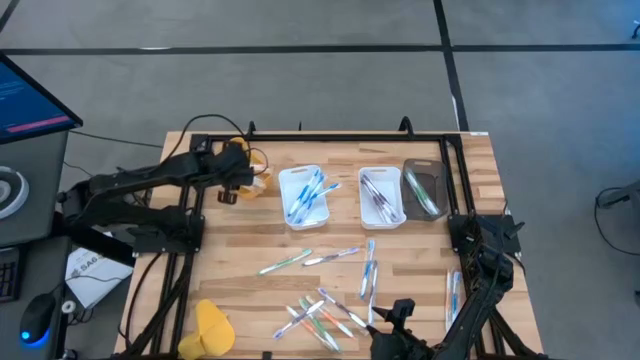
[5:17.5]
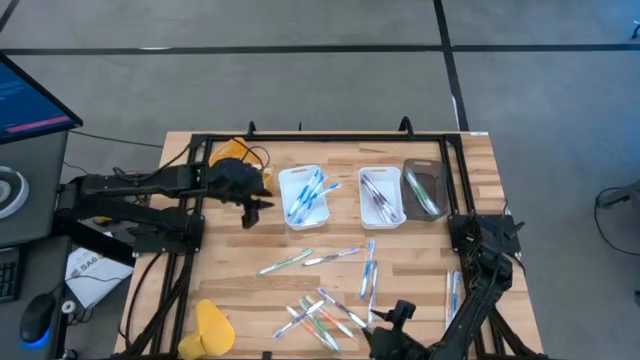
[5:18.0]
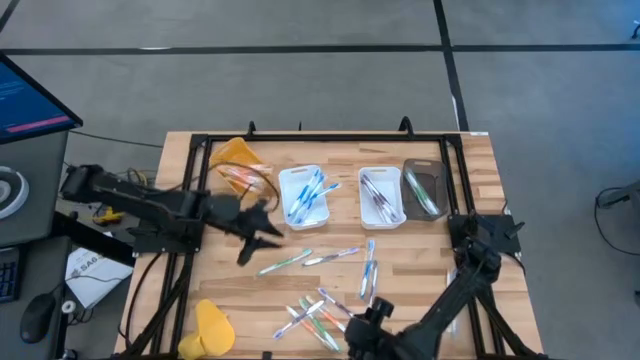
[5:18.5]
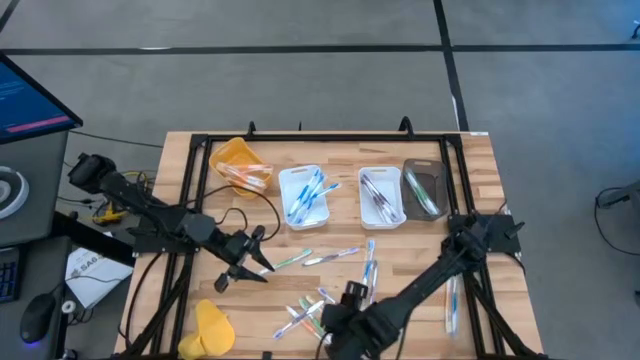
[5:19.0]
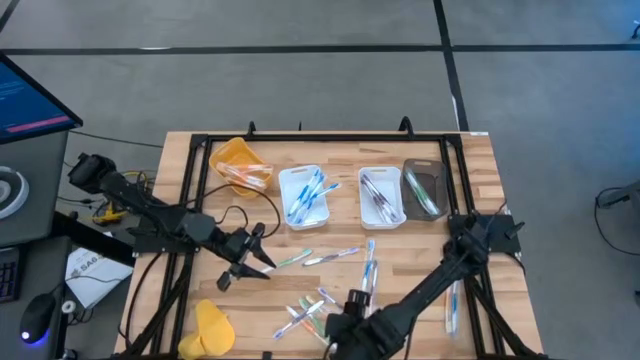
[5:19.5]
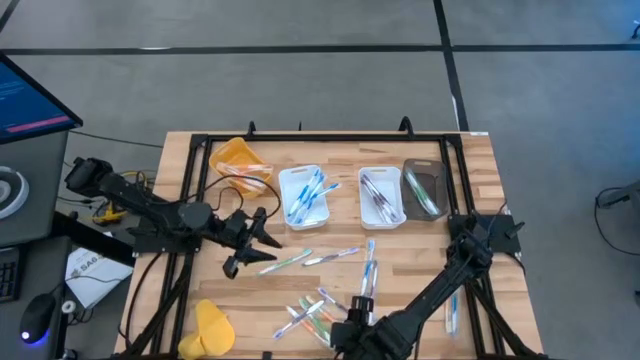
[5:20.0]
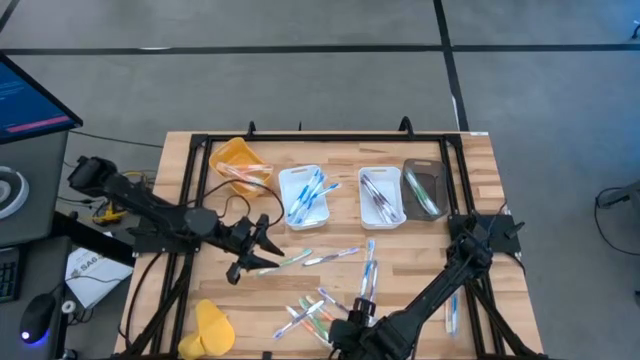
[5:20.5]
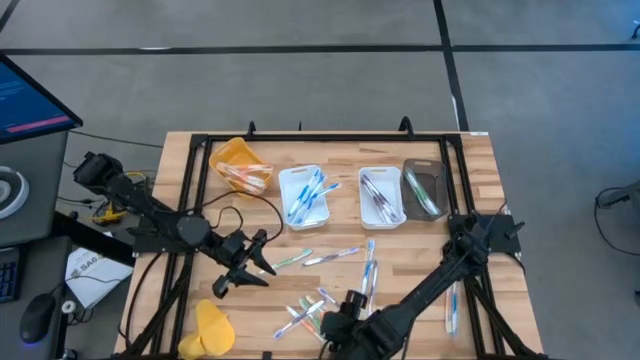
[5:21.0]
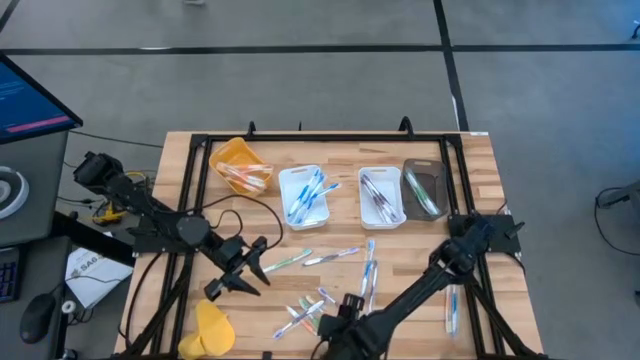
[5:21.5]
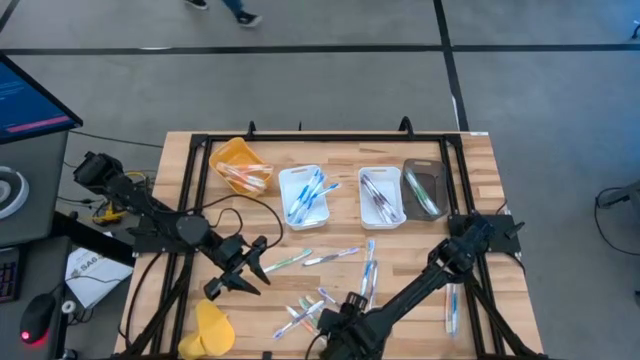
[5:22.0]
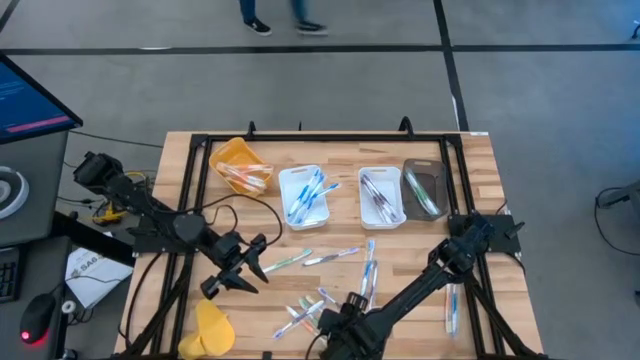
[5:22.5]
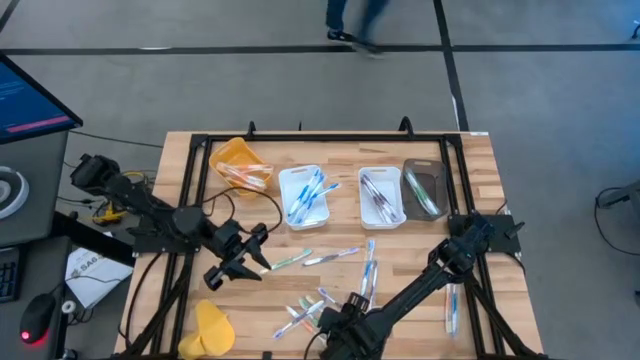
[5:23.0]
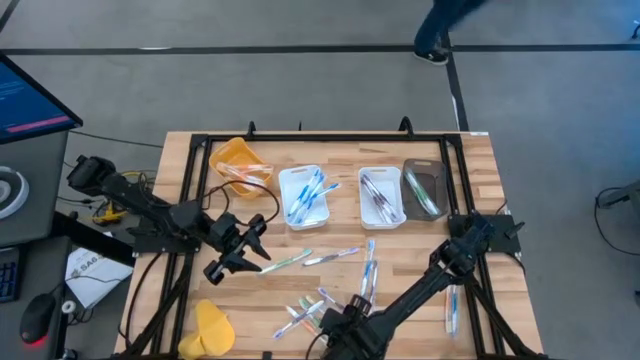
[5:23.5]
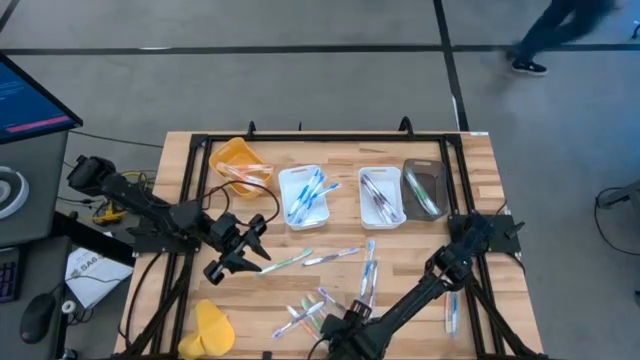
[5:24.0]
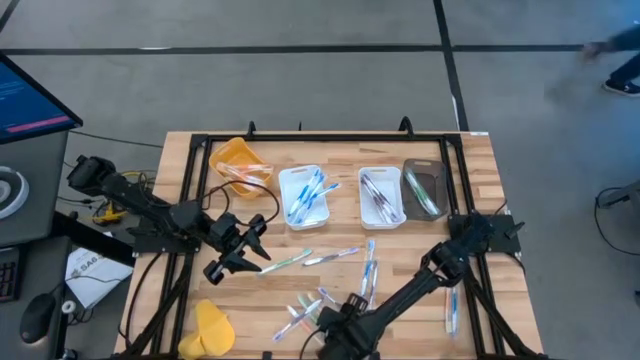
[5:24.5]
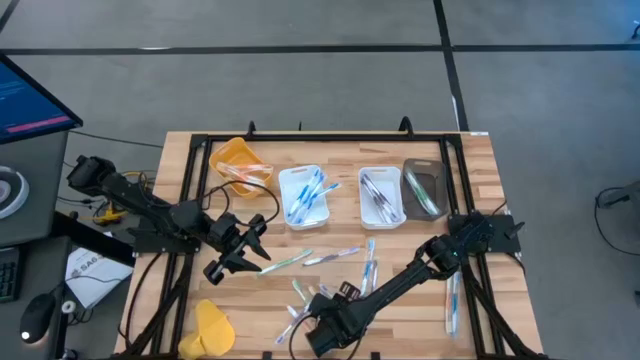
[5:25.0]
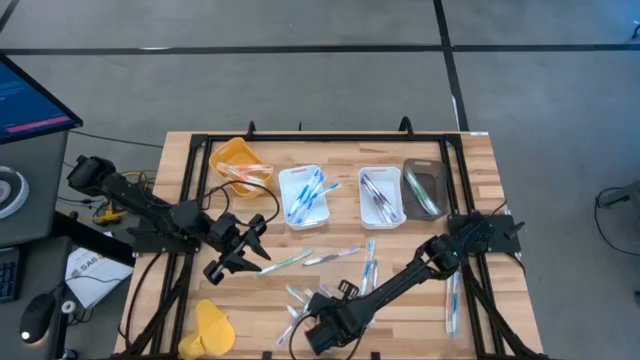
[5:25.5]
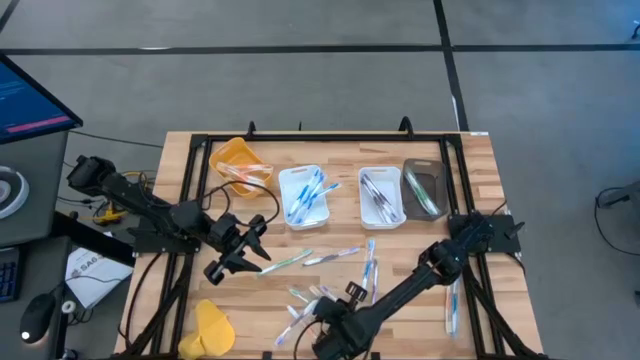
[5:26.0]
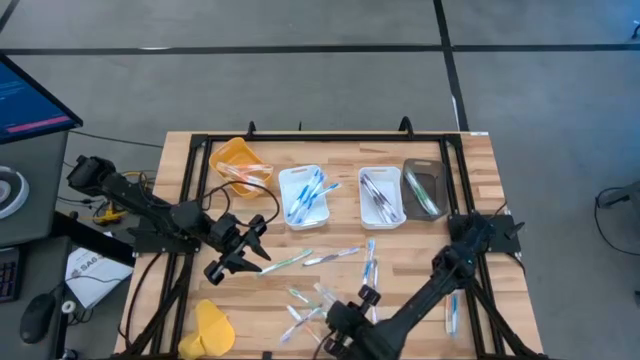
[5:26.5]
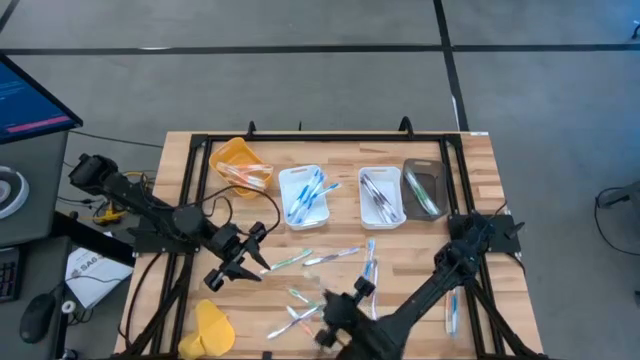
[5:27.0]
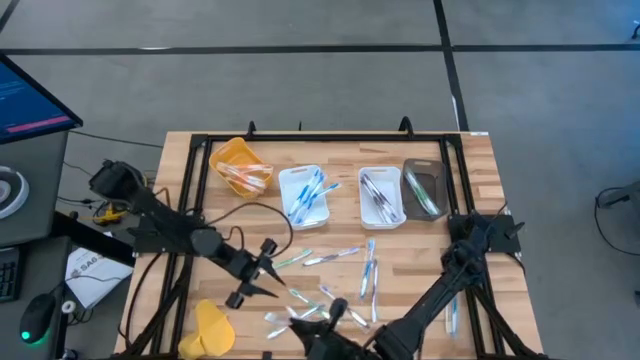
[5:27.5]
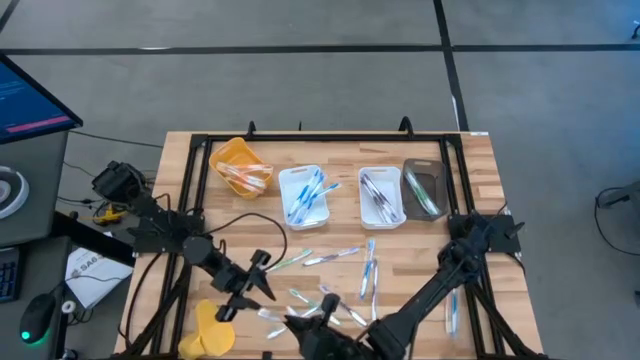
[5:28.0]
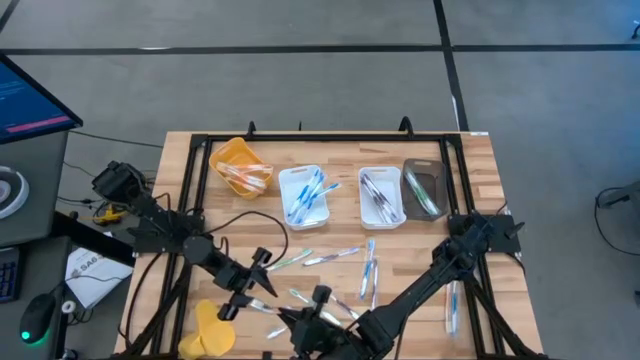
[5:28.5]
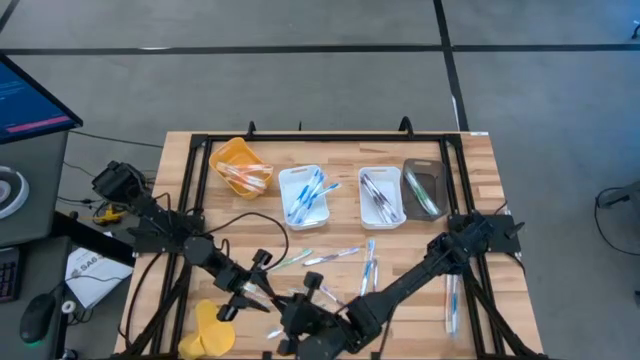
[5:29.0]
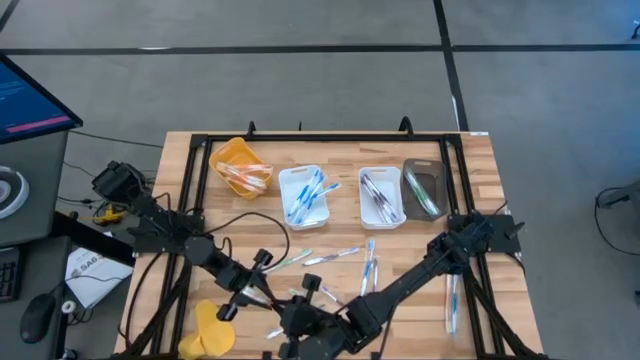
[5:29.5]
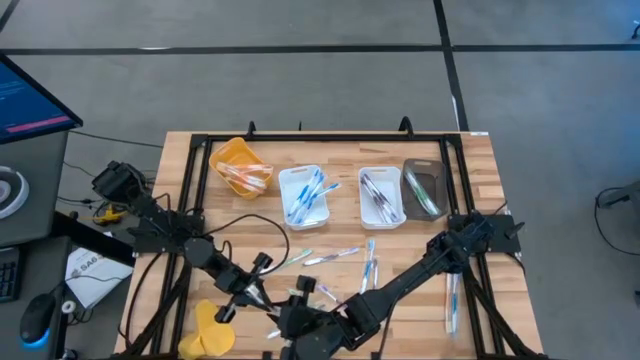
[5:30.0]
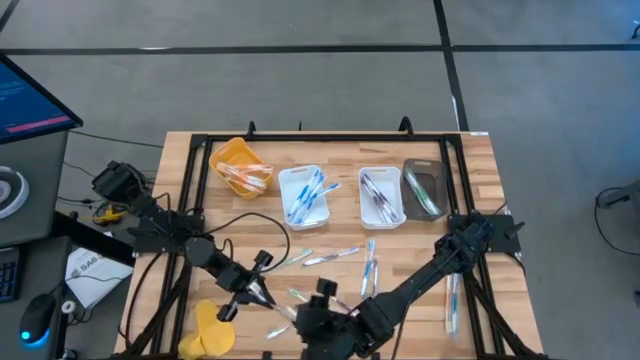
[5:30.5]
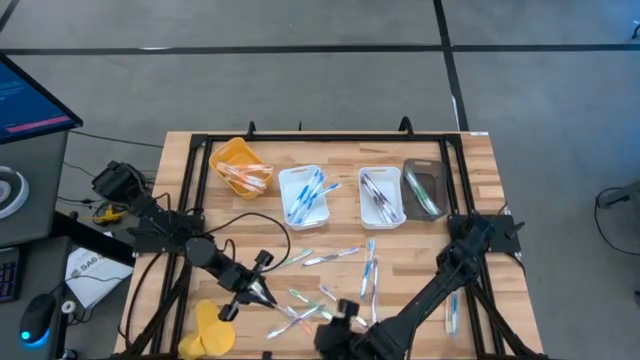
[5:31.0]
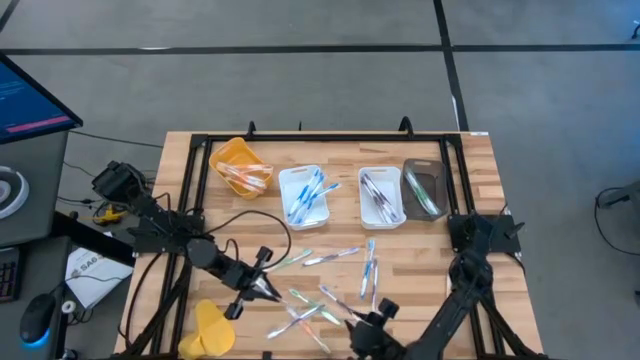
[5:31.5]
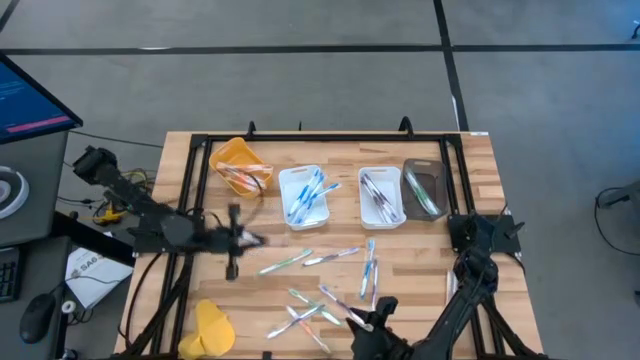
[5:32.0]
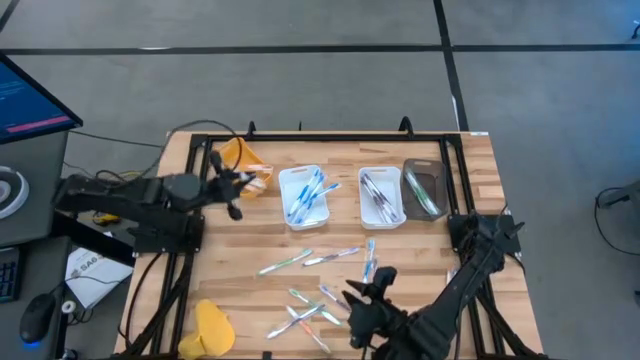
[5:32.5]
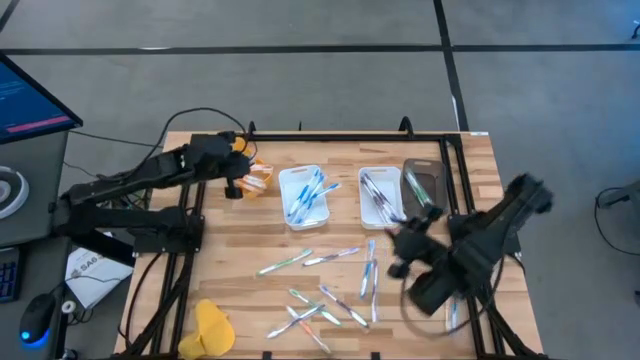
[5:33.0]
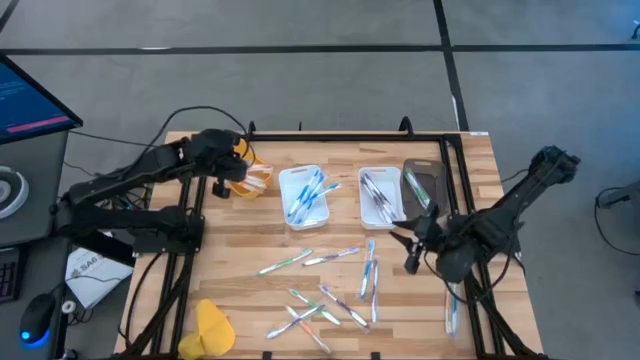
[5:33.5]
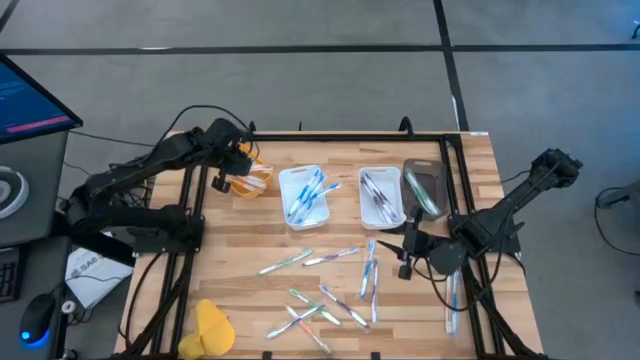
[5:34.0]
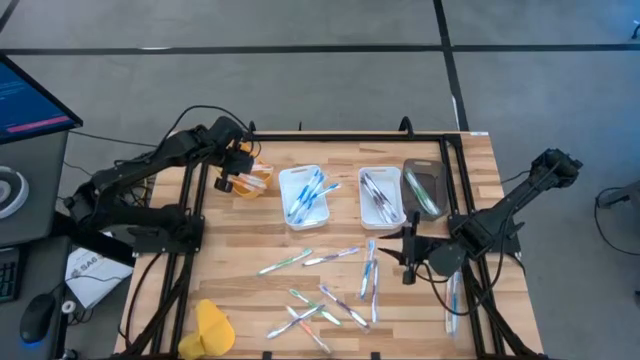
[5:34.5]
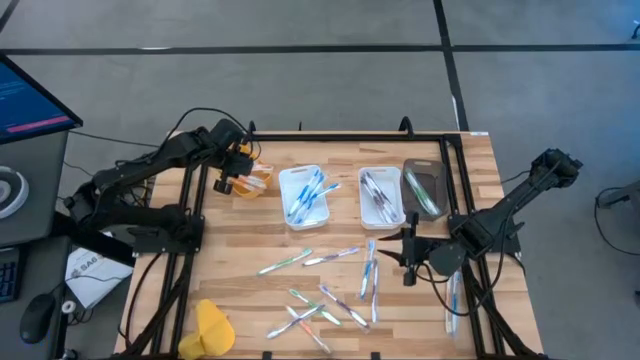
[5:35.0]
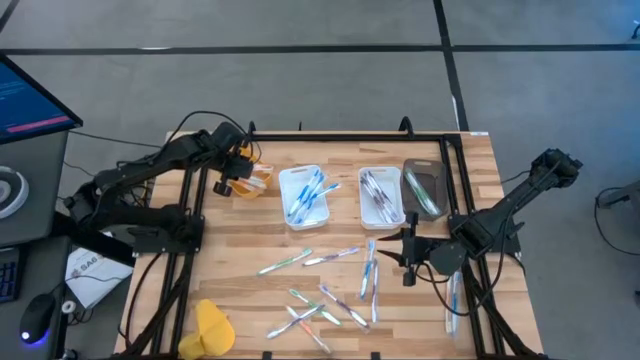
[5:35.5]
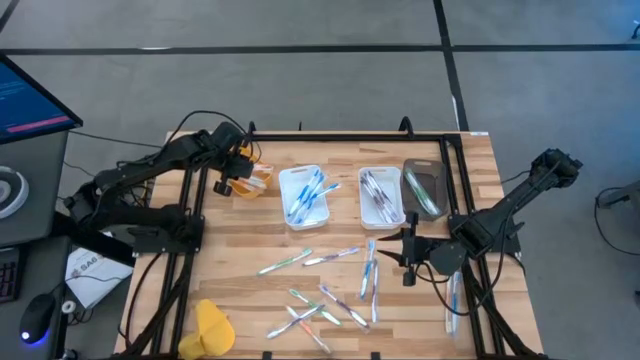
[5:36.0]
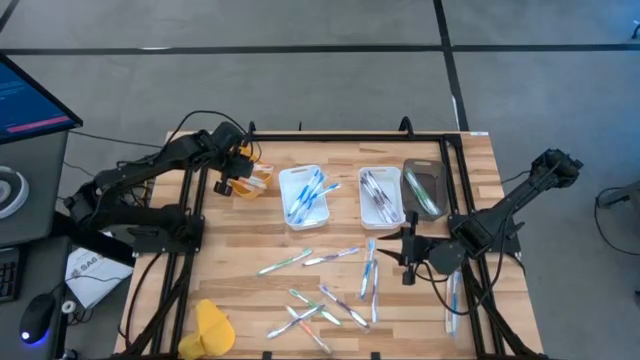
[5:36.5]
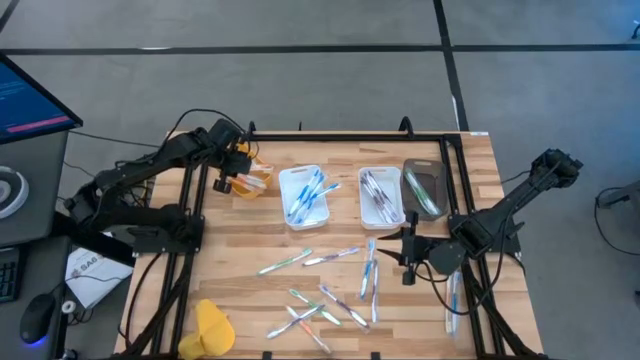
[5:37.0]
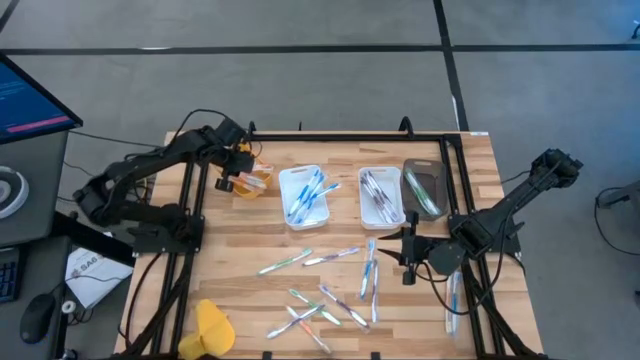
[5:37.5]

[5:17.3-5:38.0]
Task: Pick & Place Toothbrushes
Put the middle orange toothbrush into the orange bin

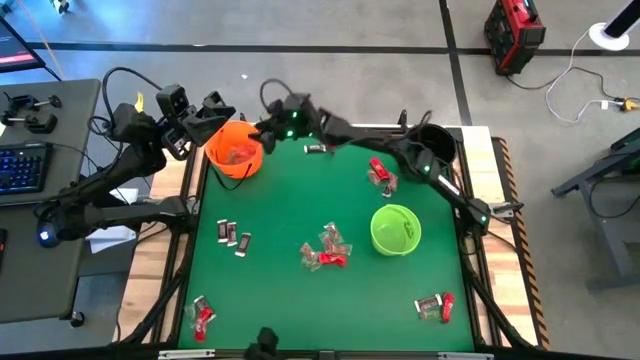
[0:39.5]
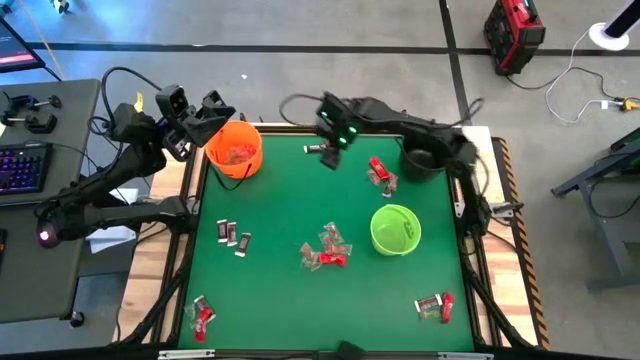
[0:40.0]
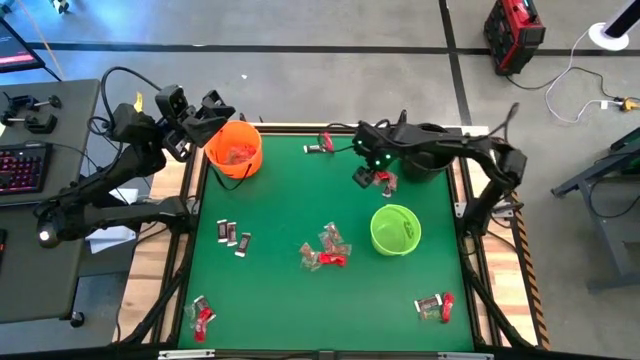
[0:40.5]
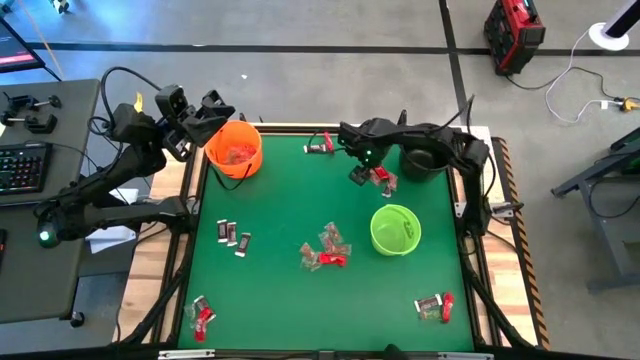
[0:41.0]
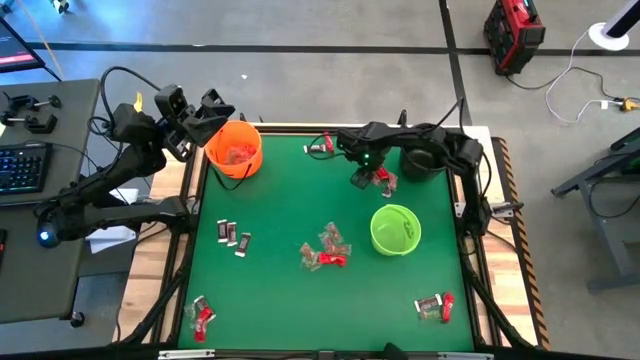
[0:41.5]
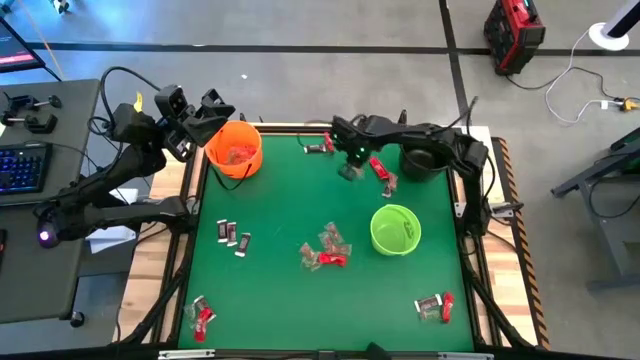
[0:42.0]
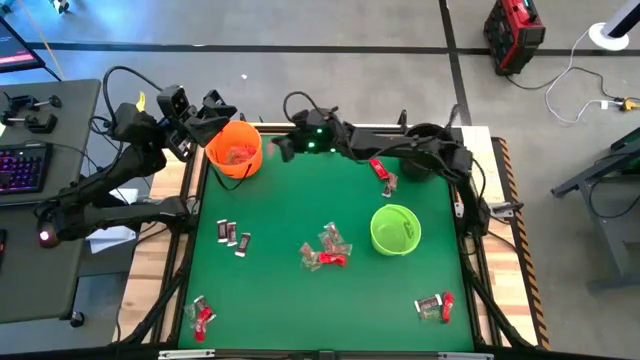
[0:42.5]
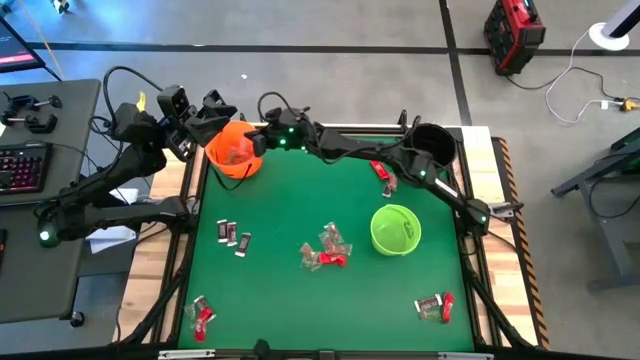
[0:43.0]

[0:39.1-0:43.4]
Task: Sort candy by brand, put in halloween buckets
Put the orange gummy into the orange bucket
